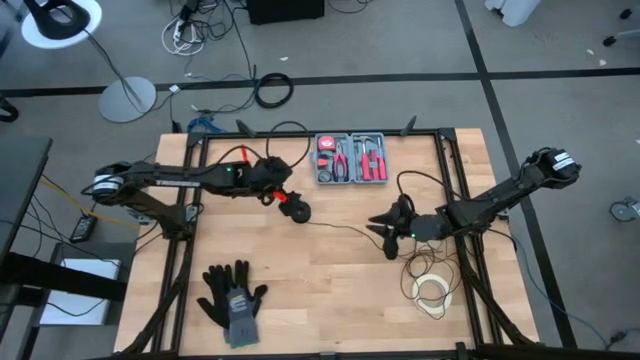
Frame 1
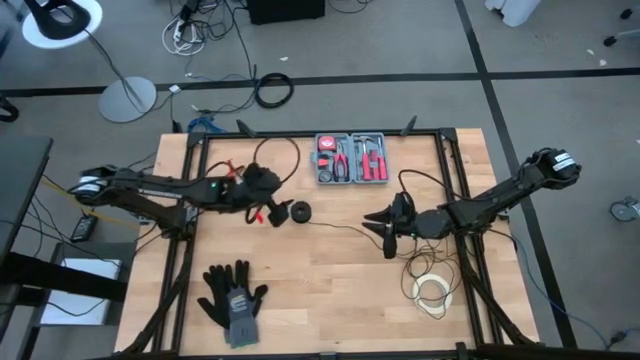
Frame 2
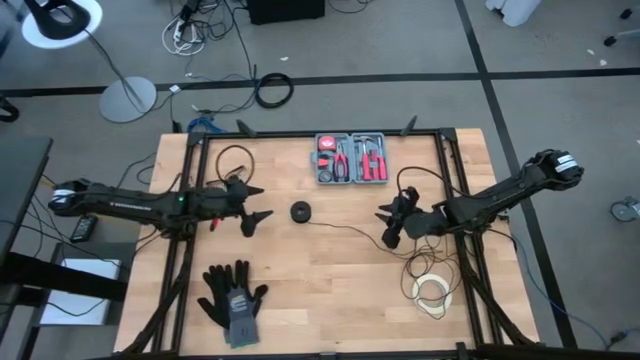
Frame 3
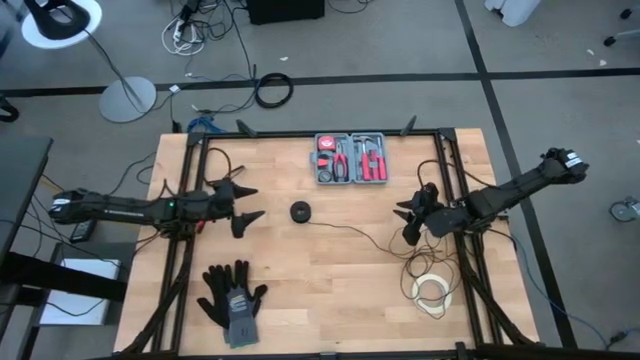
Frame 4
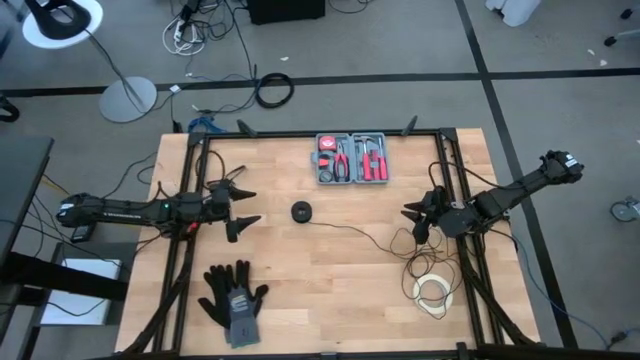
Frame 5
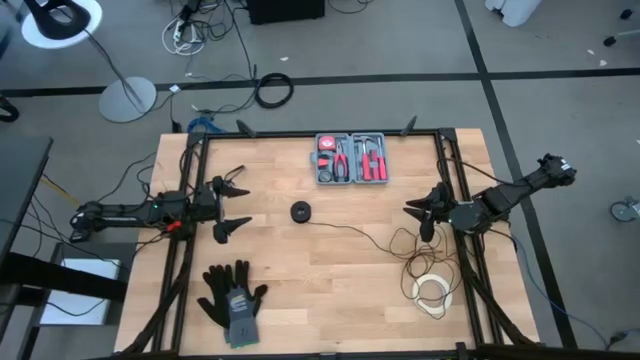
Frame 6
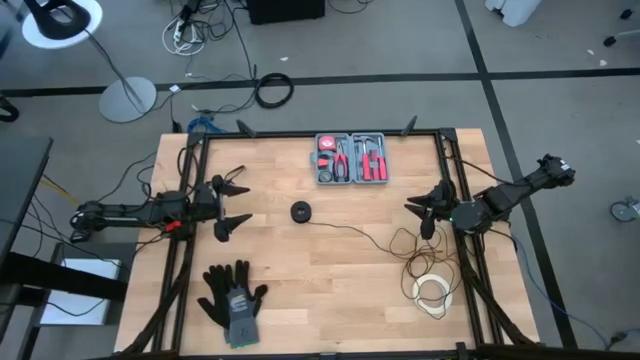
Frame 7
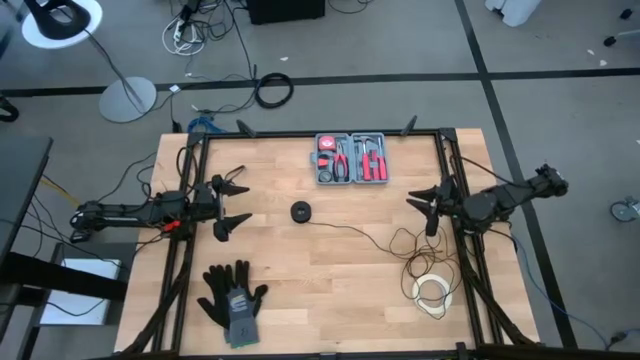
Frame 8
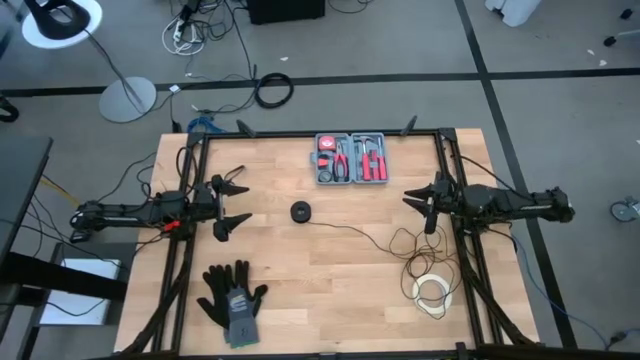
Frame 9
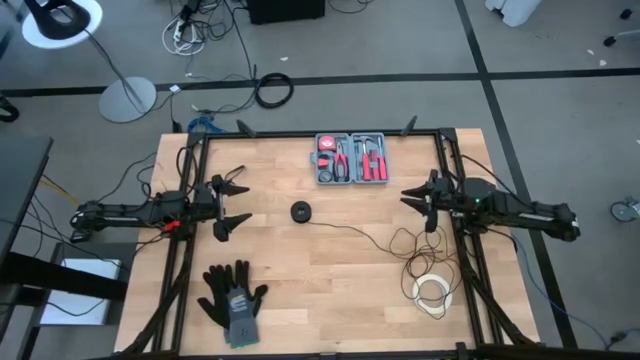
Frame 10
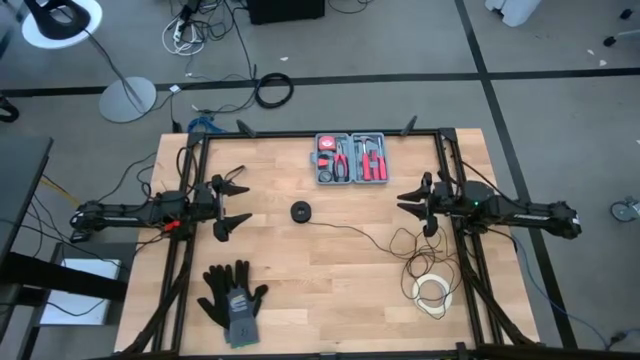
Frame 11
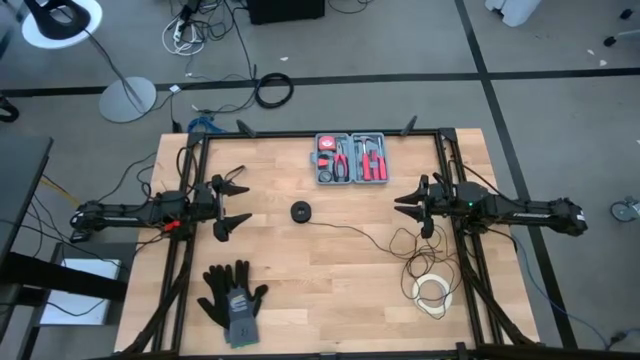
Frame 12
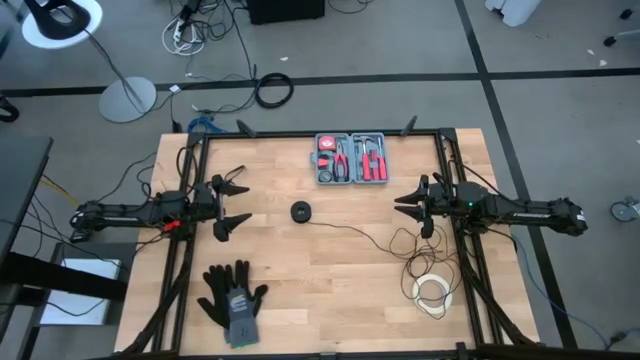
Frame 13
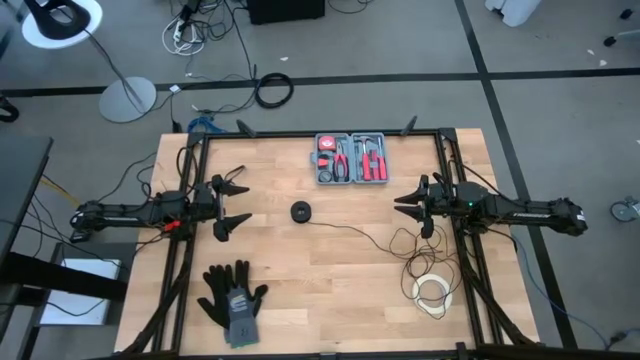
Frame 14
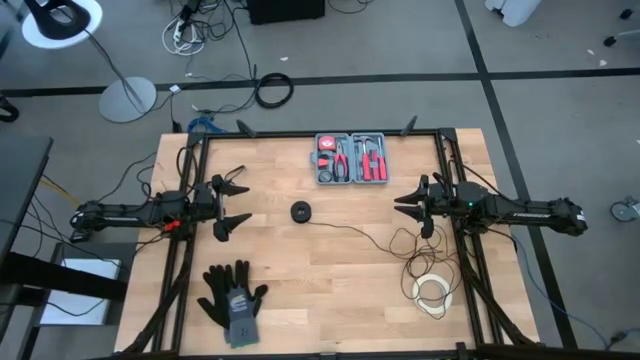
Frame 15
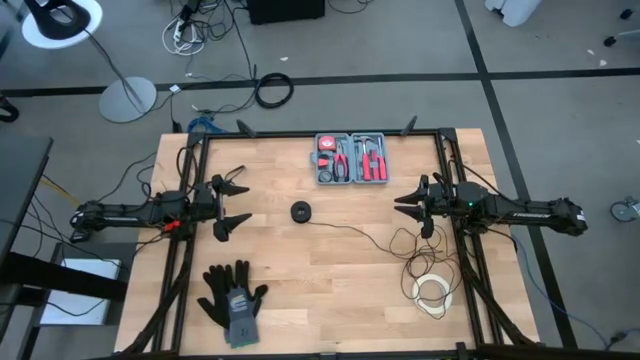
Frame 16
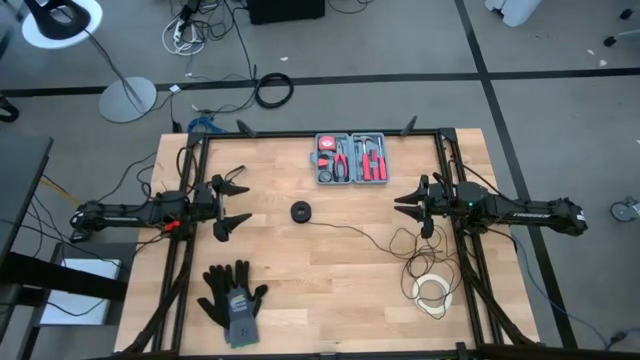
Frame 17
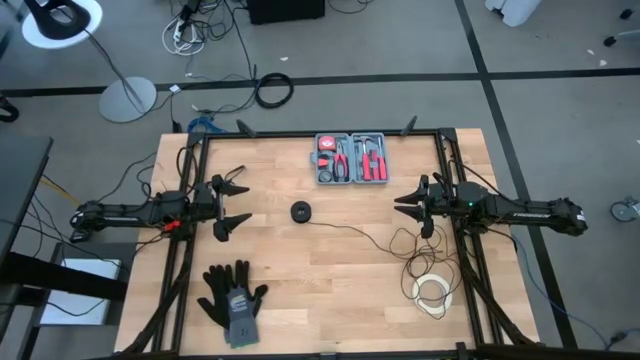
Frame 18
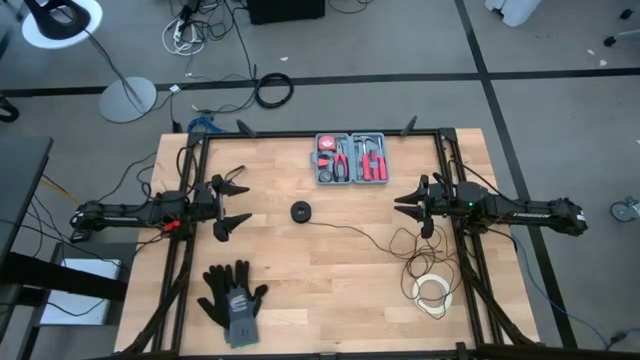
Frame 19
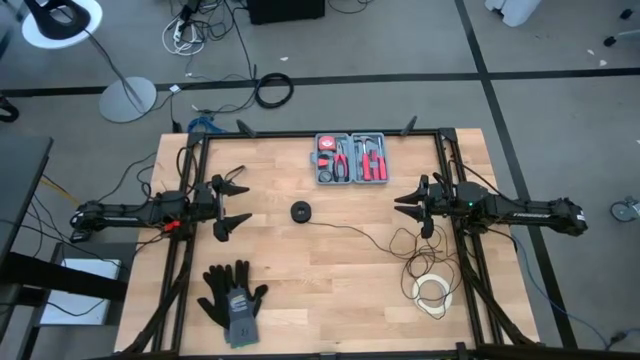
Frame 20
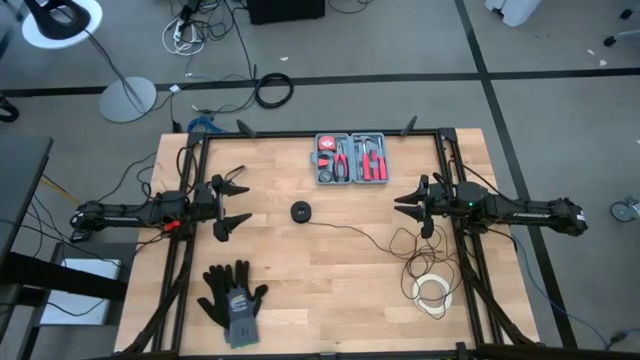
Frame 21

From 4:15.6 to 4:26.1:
Task: Coil cords
Return to Home Position
